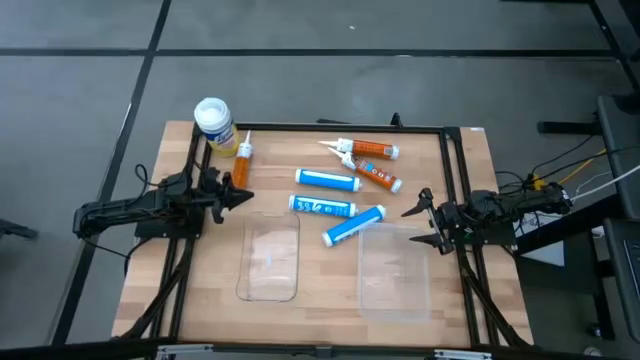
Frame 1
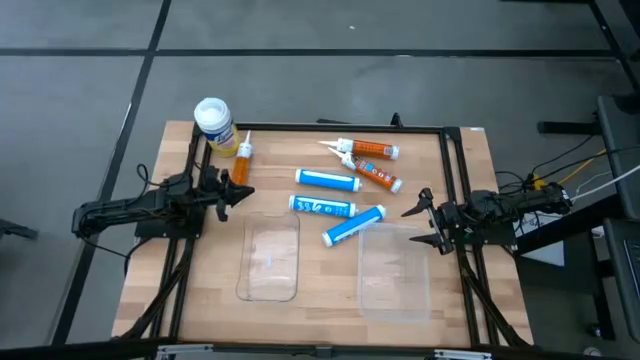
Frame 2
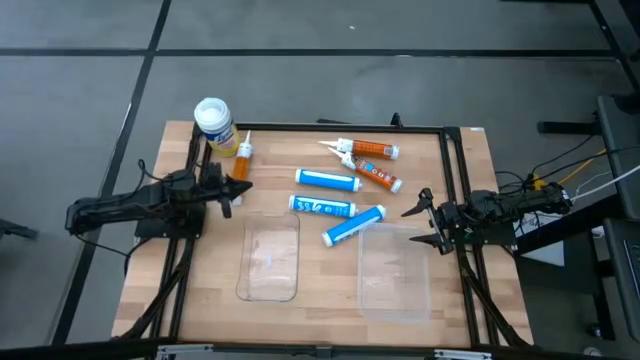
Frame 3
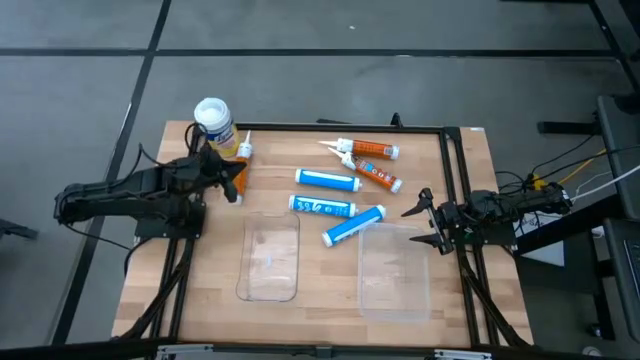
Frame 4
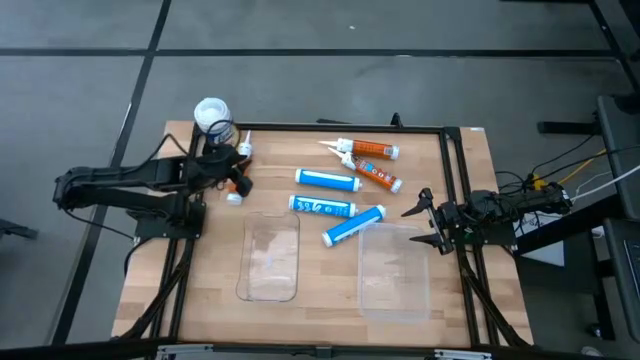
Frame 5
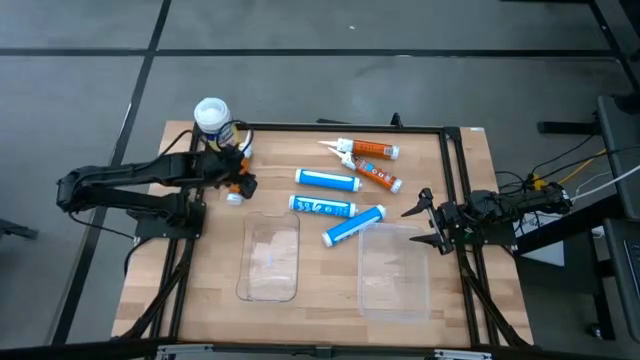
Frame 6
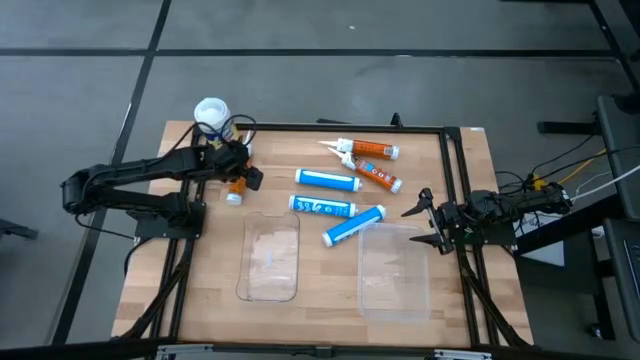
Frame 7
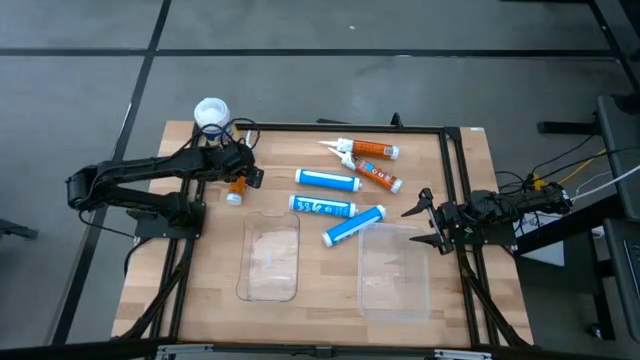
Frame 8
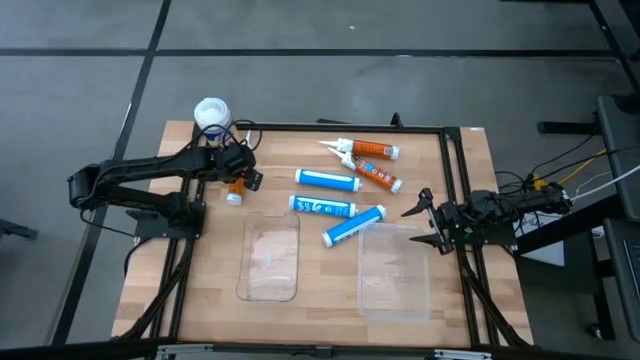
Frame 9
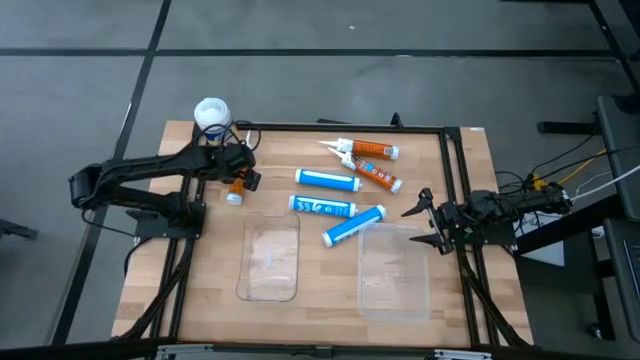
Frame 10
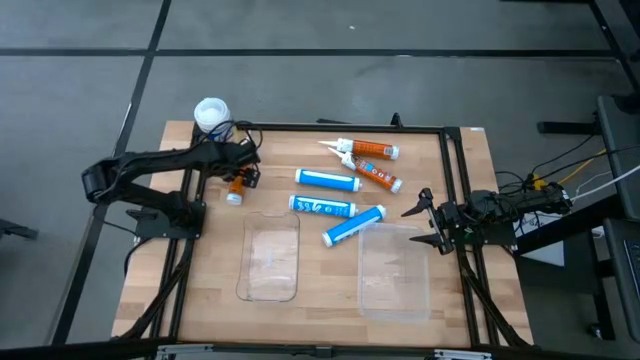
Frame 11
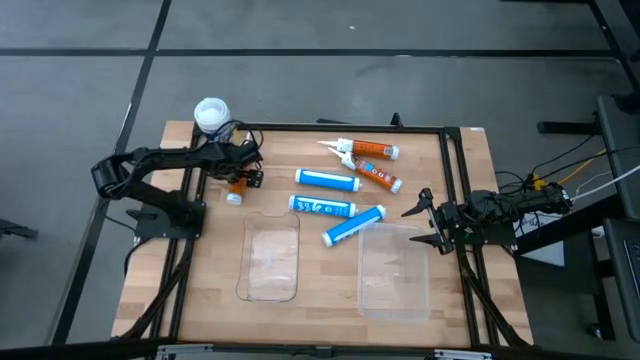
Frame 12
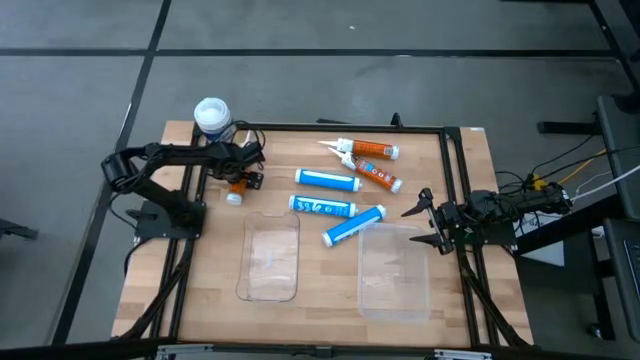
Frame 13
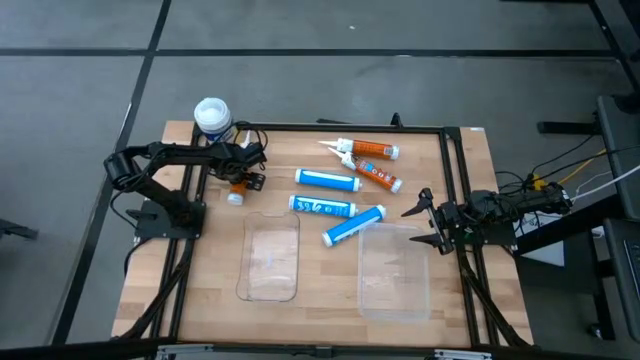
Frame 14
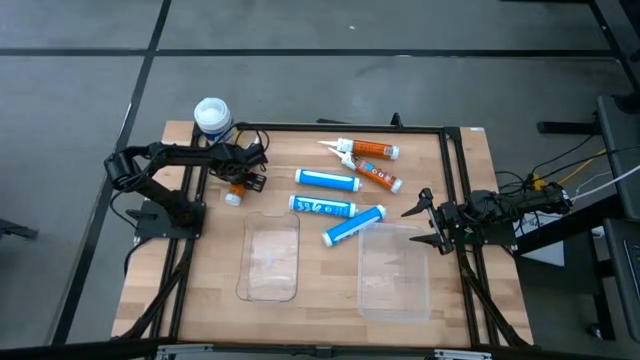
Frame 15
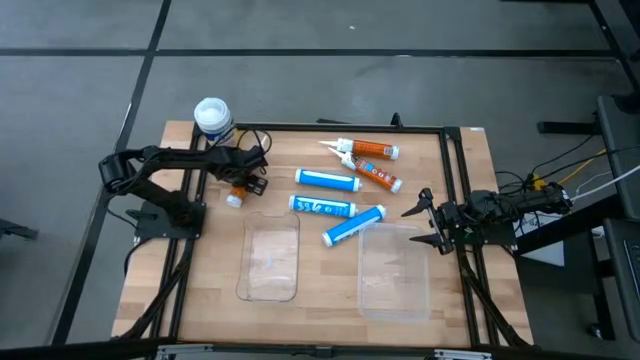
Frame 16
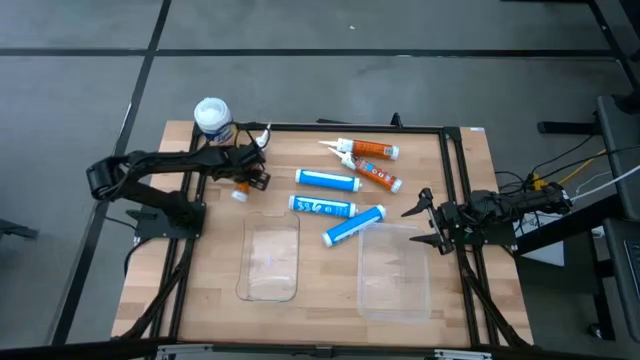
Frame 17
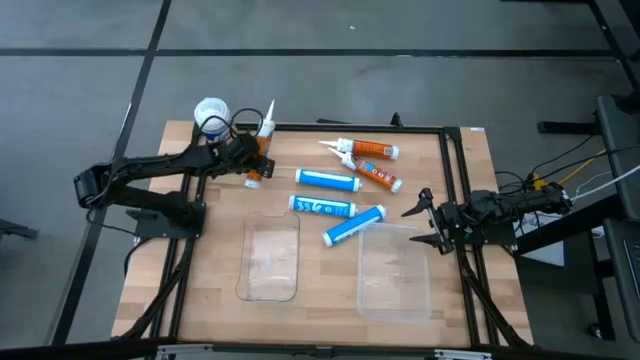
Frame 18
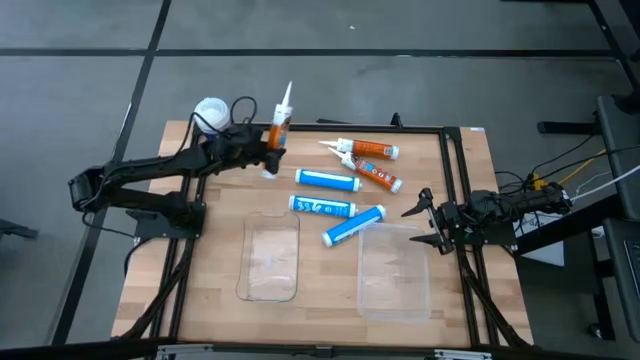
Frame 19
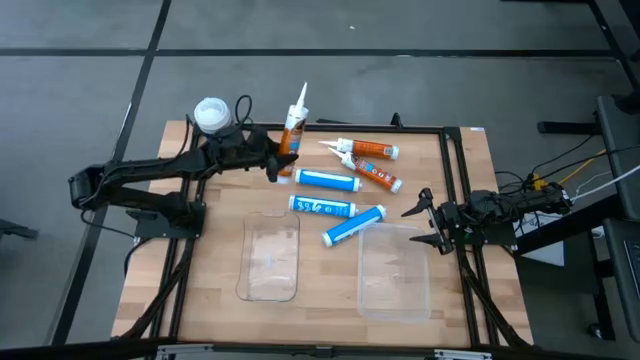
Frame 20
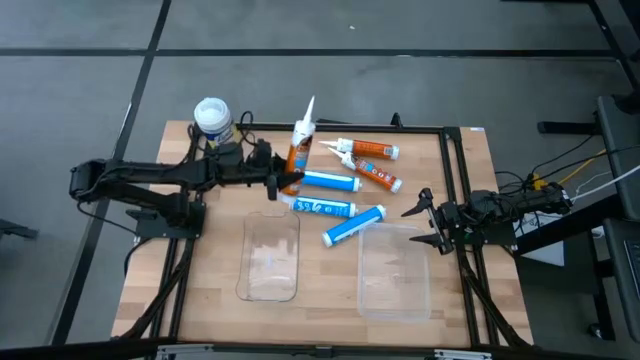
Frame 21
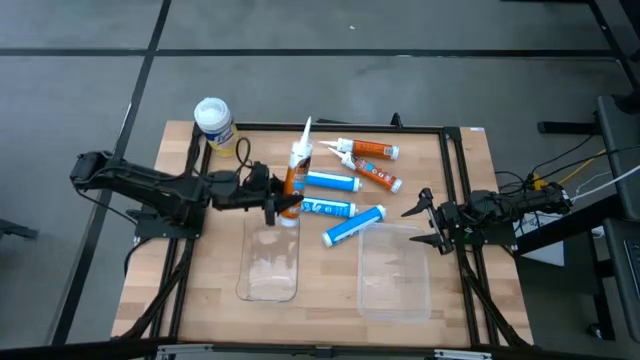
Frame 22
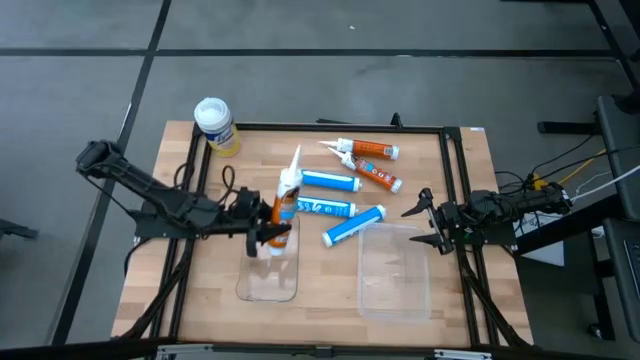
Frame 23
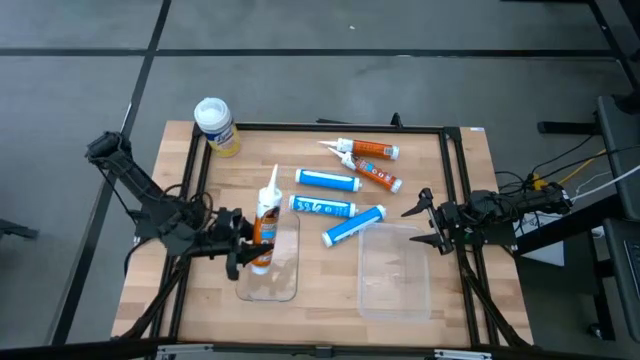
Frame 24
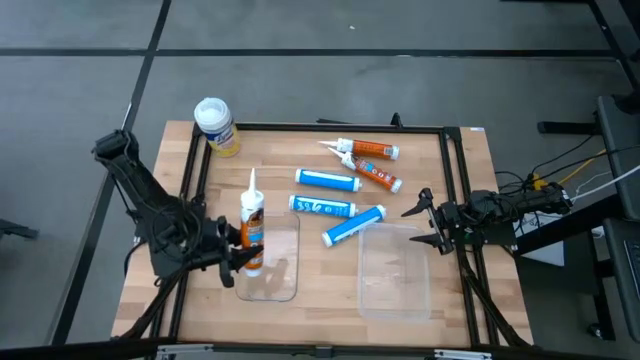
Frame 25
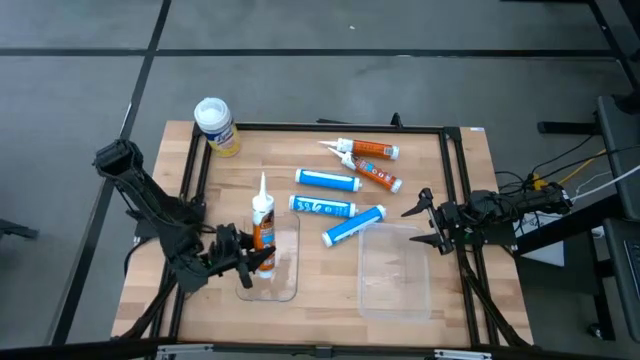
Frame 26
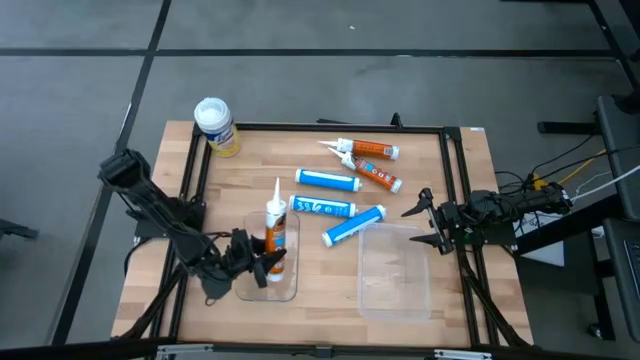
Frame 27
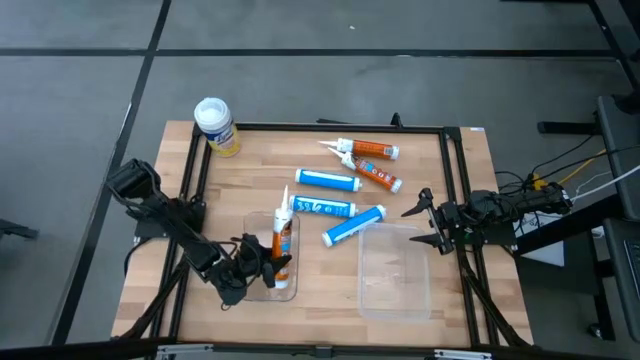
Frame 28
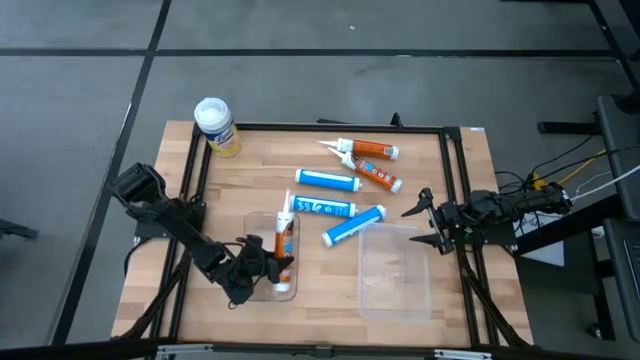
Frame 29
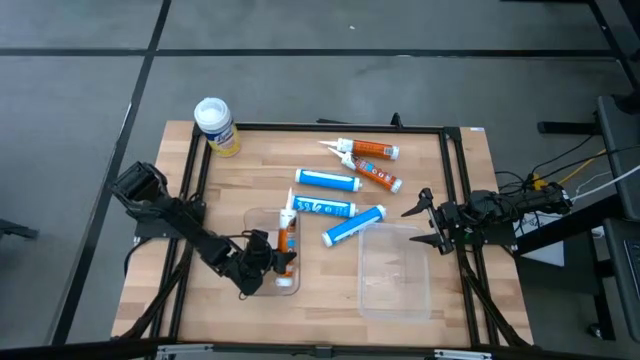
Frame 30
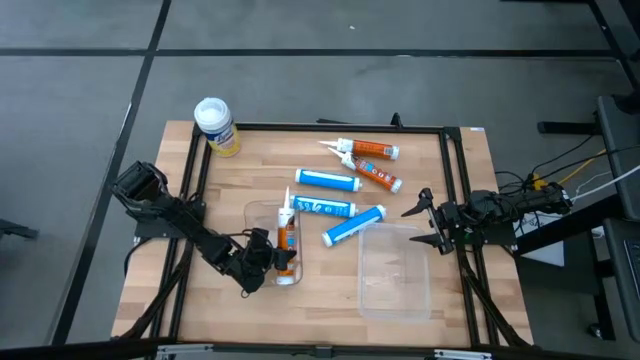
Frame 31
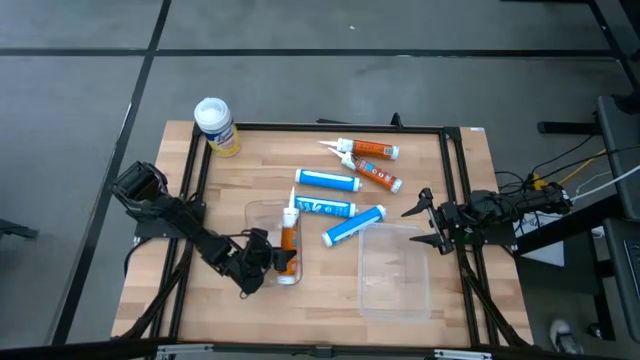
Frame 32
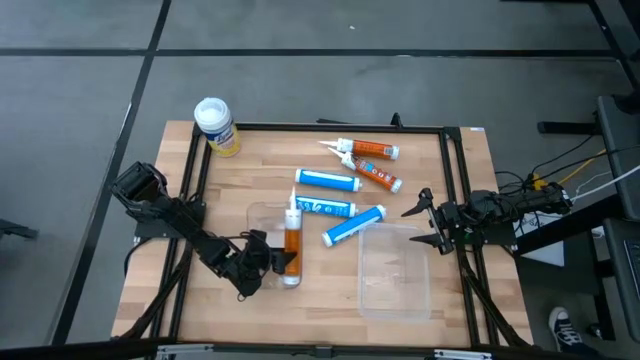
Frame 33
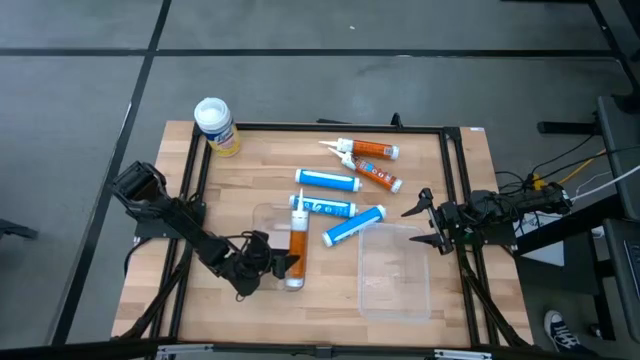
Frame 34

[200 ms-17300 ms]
Task: Pick & place silicon tubes, Sealant and Lysol wipes
Put the left orange sealant into the left transparent bin

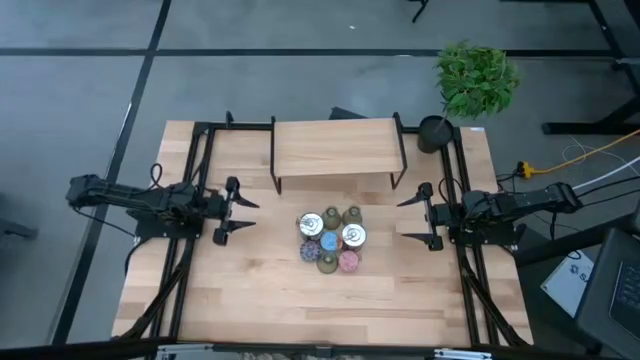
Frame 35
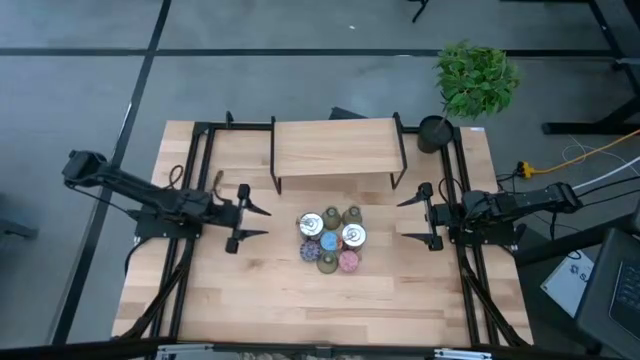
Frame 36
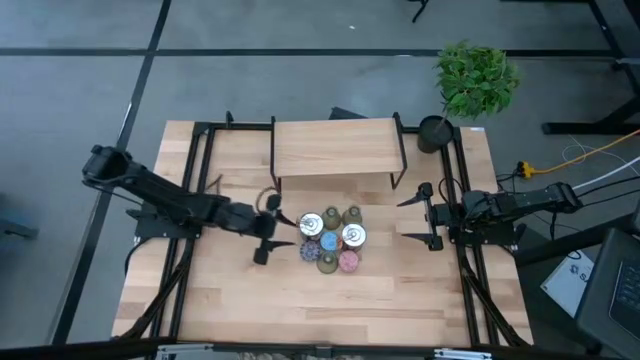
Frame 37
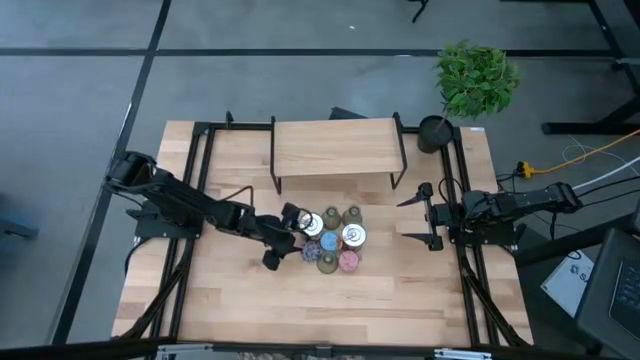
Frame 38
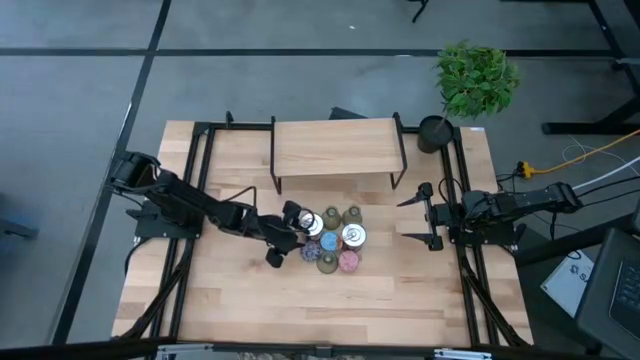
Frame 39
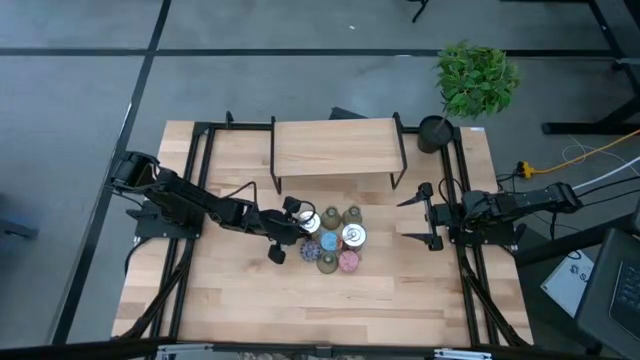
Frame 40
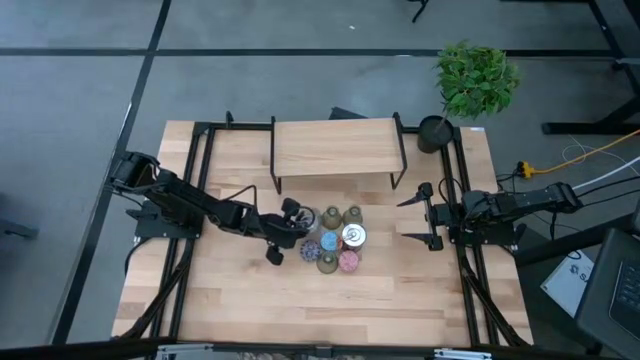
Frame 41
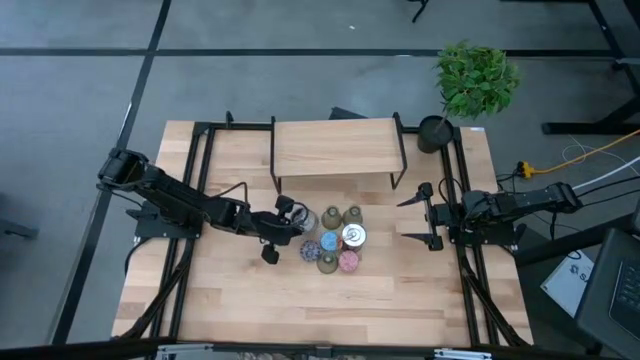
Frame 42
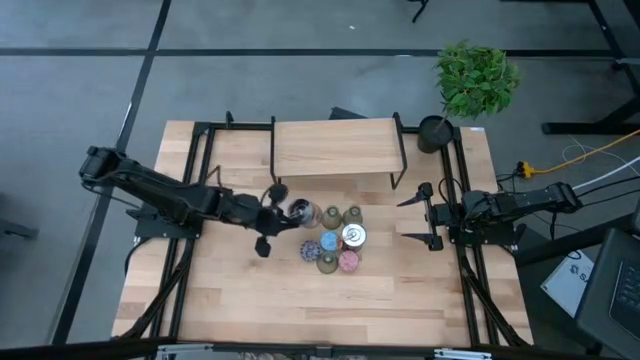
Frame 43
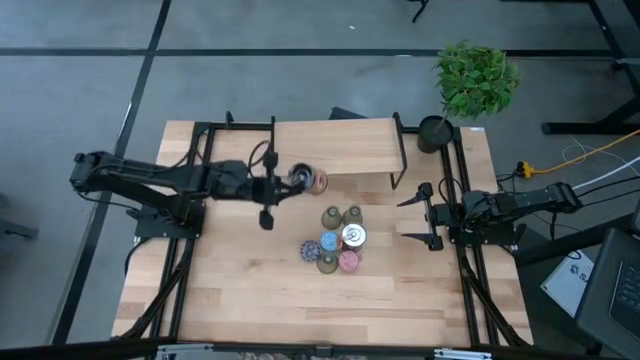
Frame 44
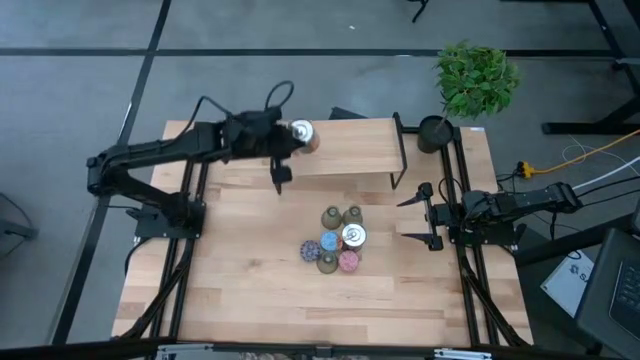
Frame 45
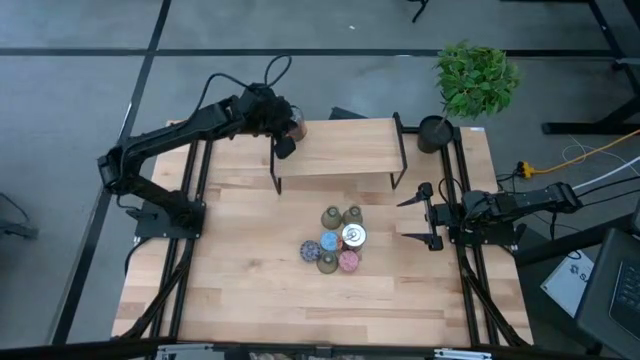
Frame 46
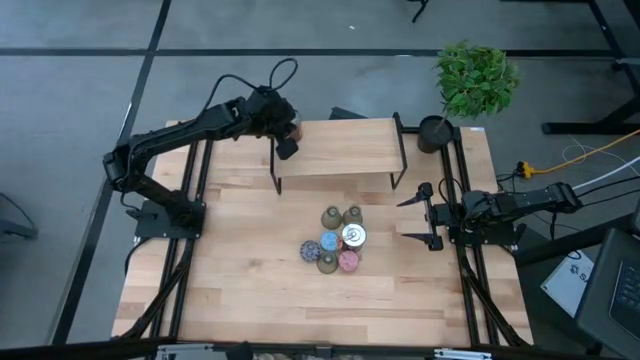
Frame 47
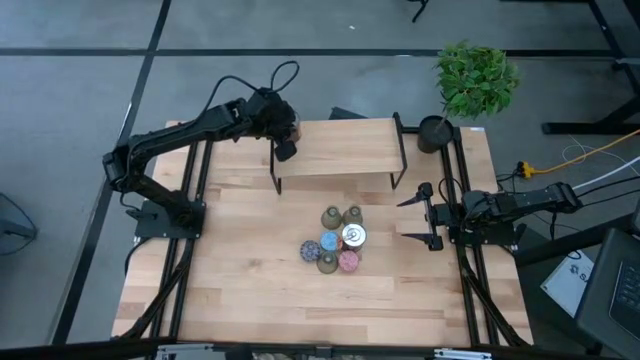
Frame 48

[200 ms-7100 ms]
Task: Pick & Place candle stick holders
Put the orange scented candle on the shelf
